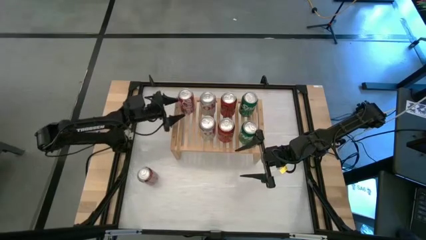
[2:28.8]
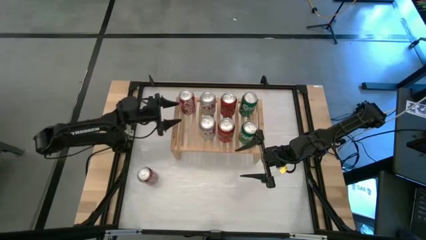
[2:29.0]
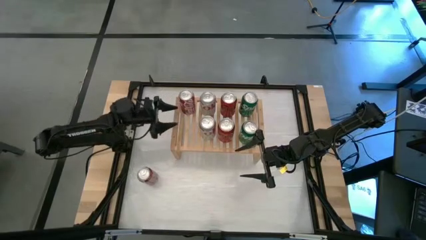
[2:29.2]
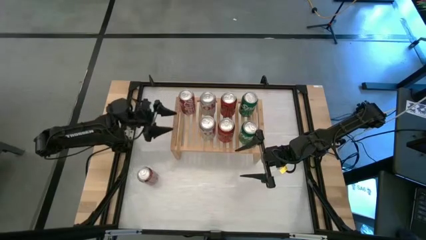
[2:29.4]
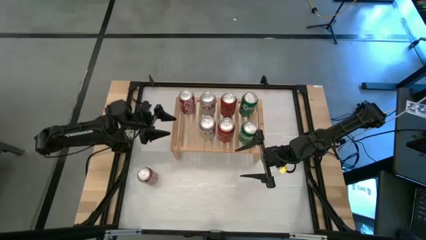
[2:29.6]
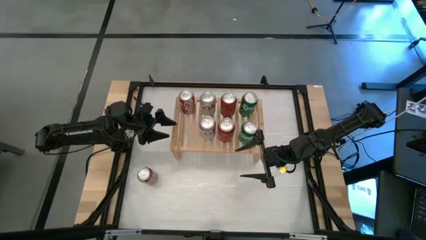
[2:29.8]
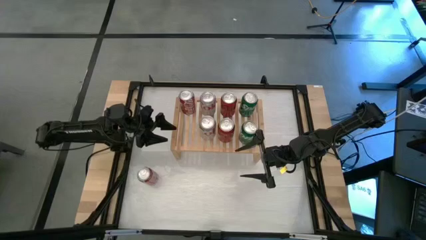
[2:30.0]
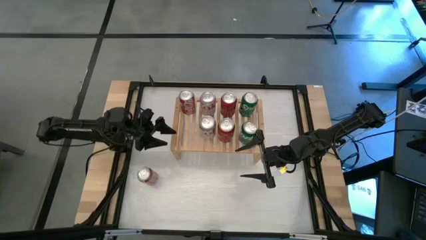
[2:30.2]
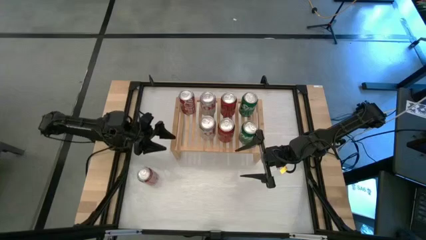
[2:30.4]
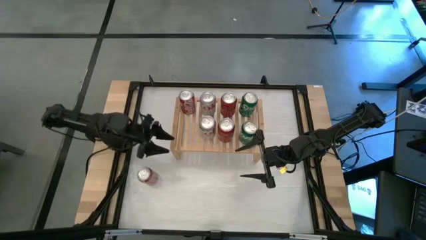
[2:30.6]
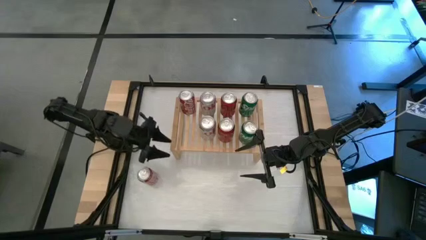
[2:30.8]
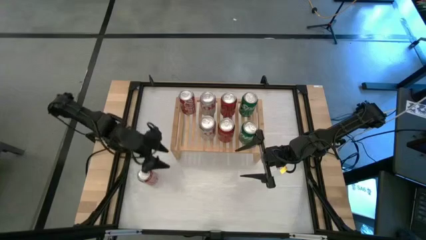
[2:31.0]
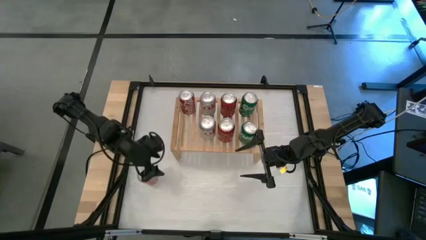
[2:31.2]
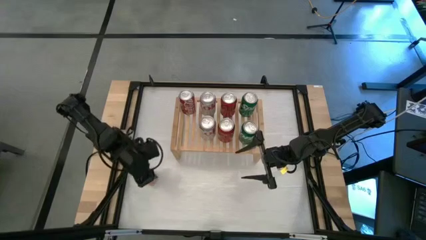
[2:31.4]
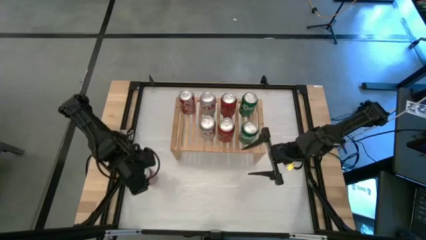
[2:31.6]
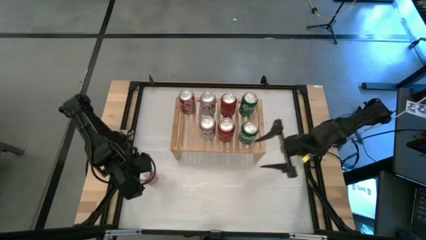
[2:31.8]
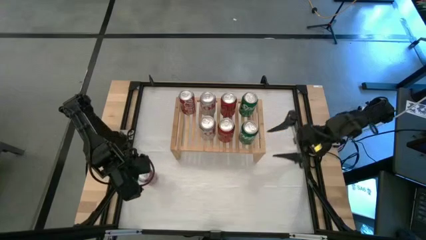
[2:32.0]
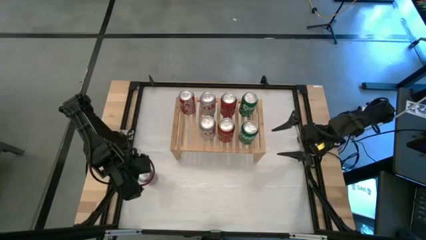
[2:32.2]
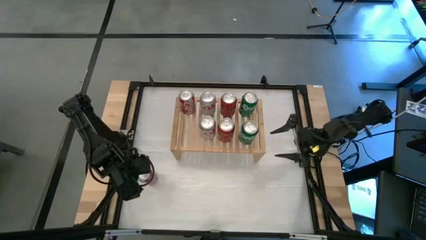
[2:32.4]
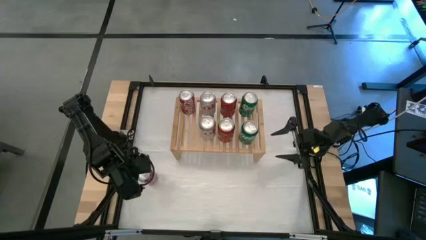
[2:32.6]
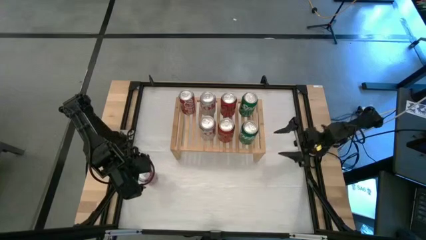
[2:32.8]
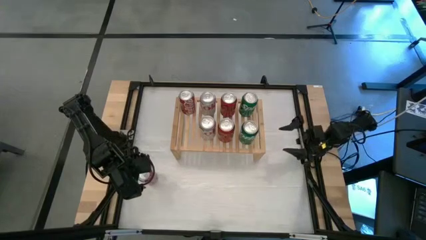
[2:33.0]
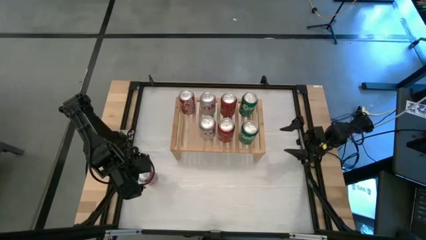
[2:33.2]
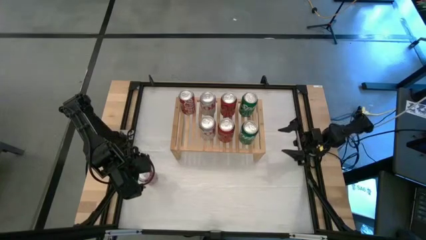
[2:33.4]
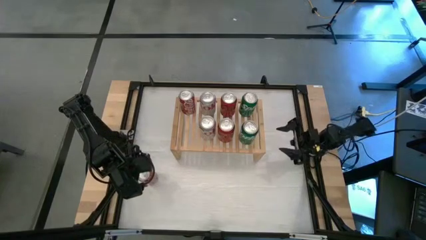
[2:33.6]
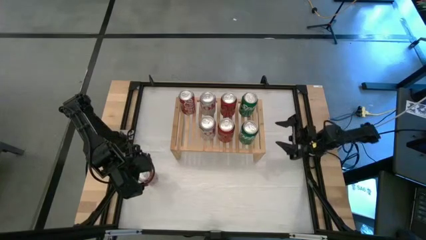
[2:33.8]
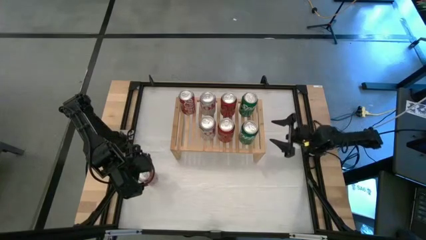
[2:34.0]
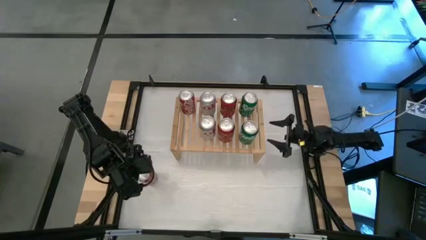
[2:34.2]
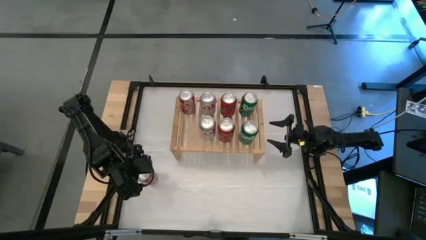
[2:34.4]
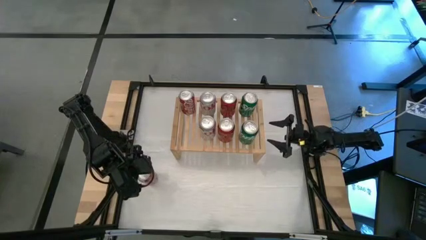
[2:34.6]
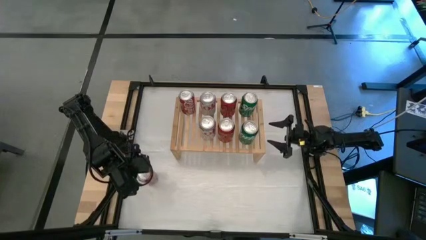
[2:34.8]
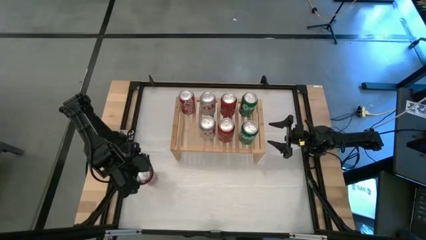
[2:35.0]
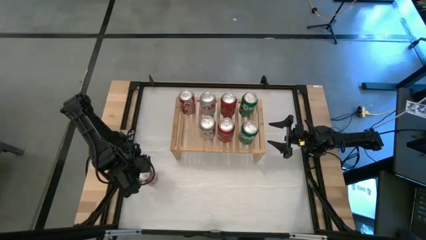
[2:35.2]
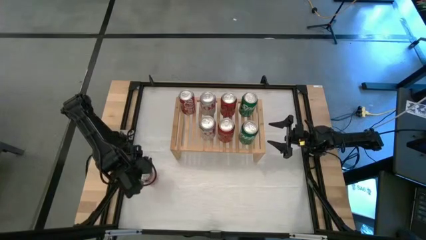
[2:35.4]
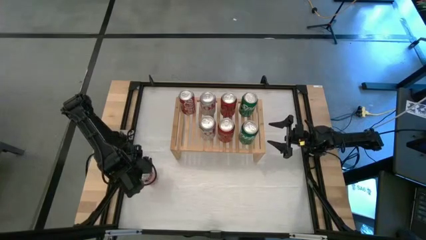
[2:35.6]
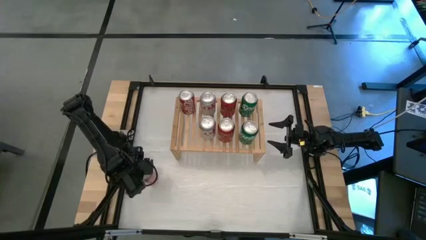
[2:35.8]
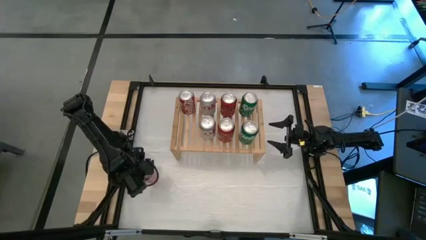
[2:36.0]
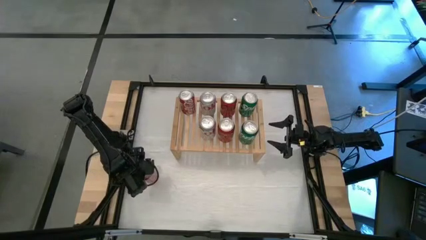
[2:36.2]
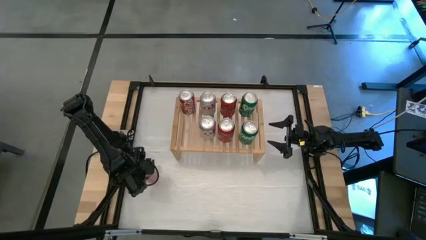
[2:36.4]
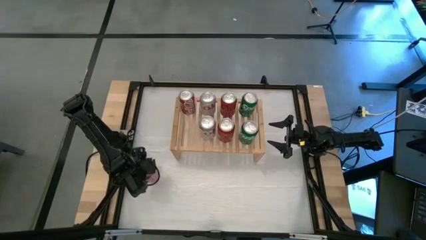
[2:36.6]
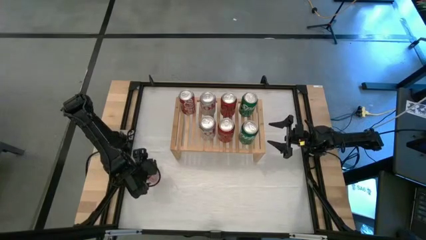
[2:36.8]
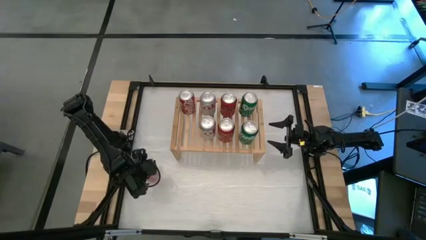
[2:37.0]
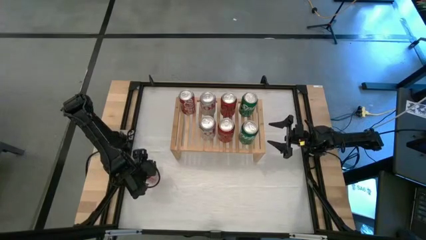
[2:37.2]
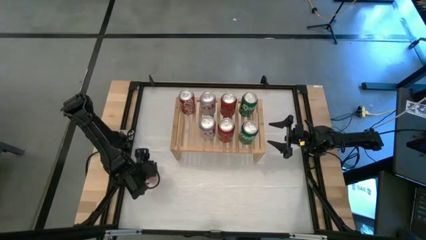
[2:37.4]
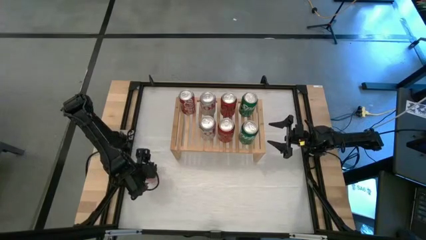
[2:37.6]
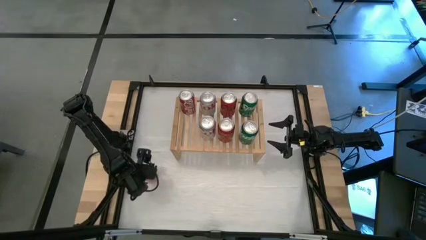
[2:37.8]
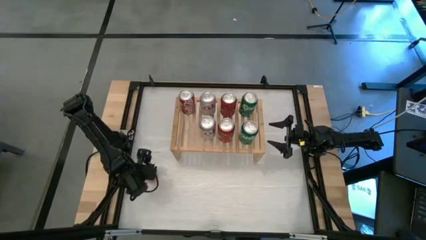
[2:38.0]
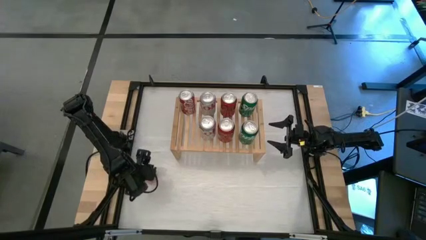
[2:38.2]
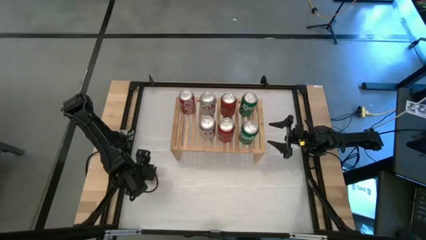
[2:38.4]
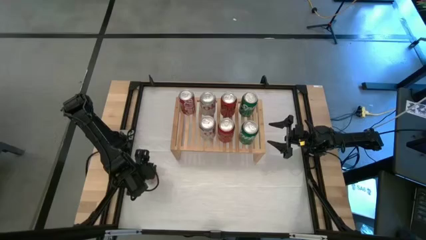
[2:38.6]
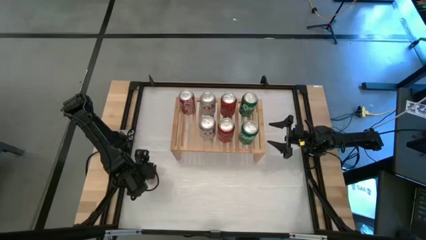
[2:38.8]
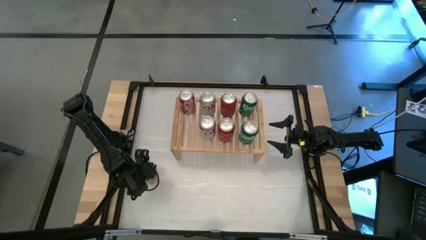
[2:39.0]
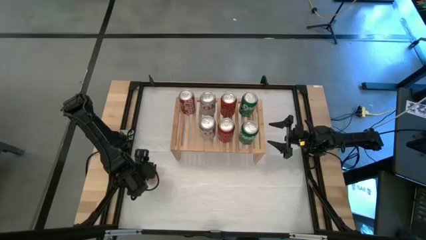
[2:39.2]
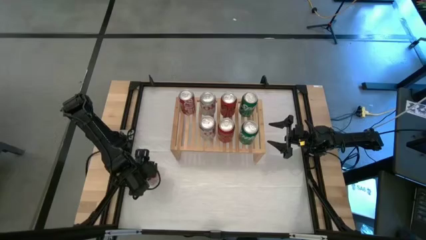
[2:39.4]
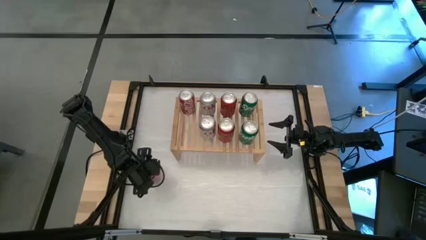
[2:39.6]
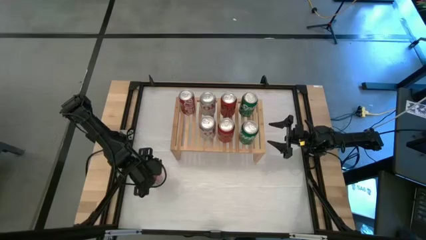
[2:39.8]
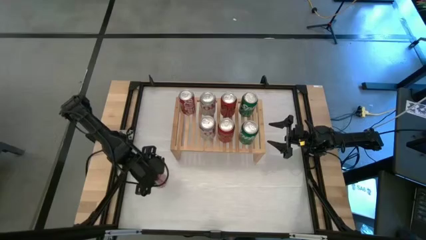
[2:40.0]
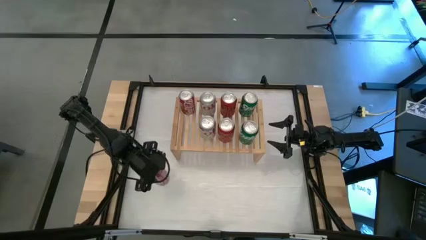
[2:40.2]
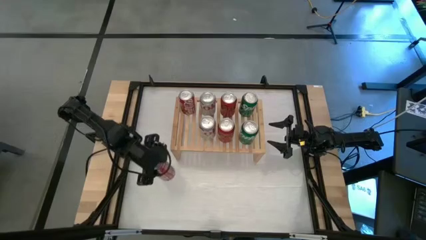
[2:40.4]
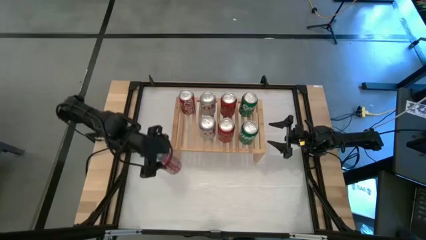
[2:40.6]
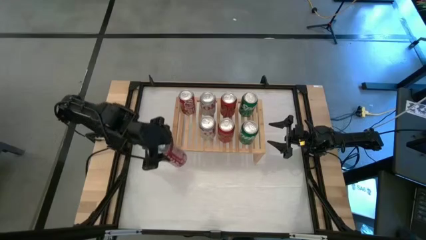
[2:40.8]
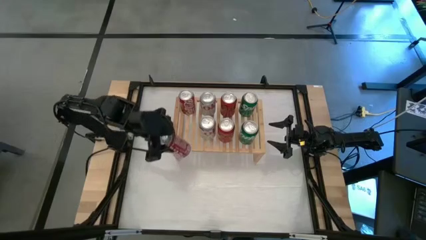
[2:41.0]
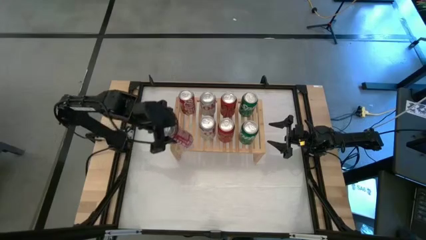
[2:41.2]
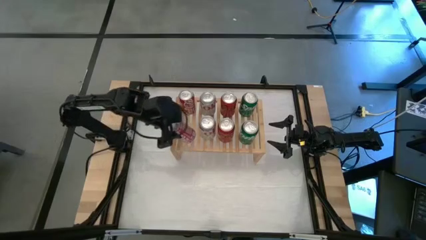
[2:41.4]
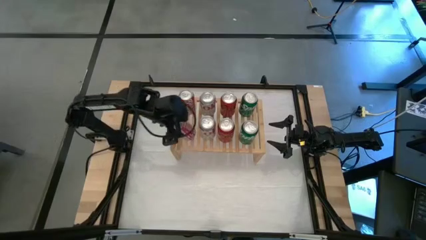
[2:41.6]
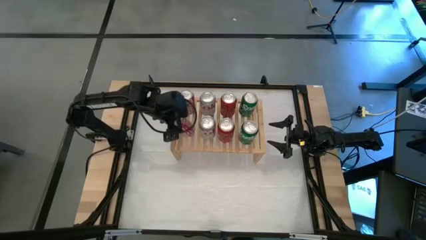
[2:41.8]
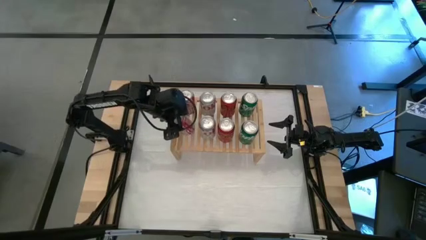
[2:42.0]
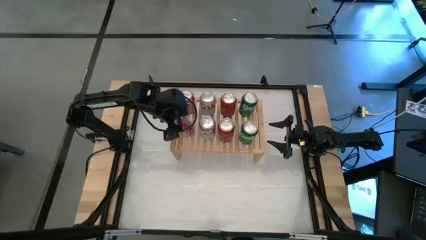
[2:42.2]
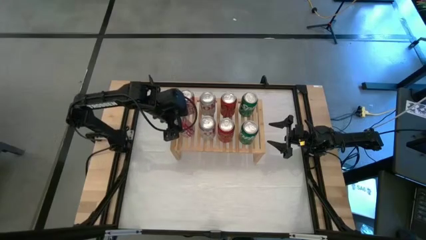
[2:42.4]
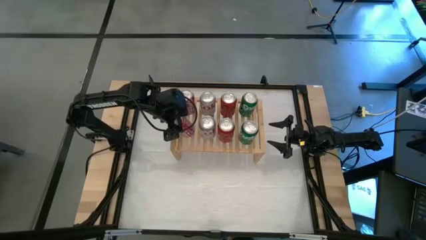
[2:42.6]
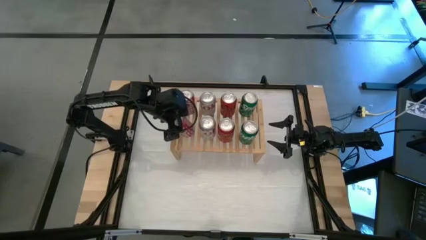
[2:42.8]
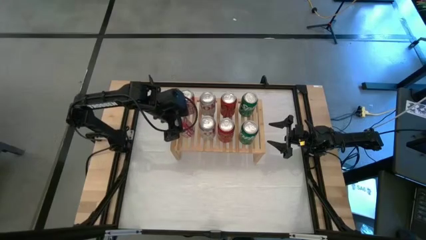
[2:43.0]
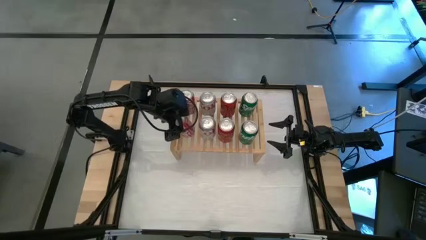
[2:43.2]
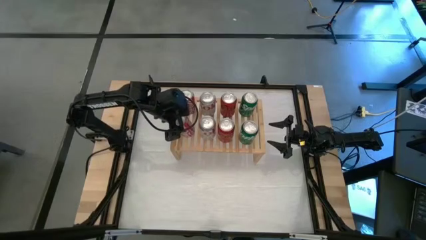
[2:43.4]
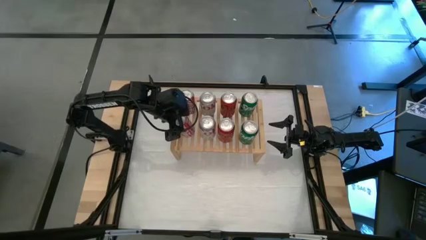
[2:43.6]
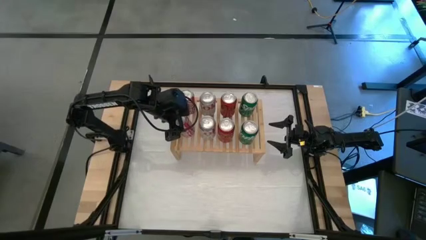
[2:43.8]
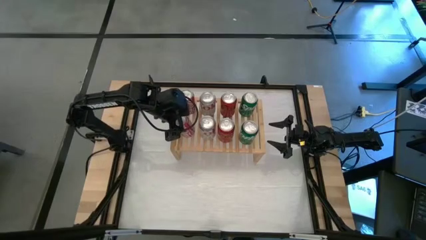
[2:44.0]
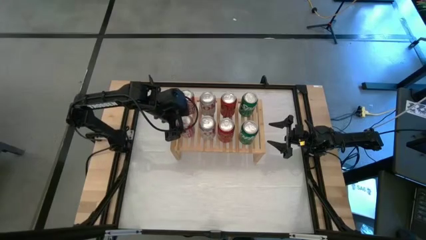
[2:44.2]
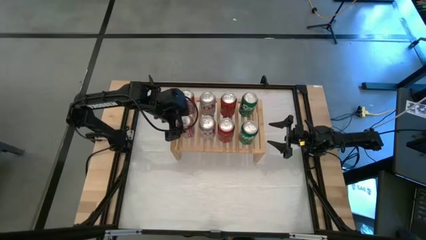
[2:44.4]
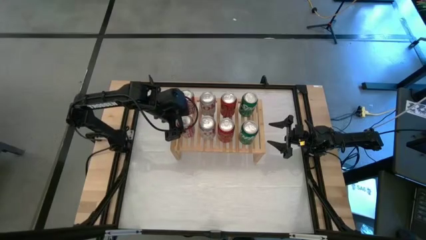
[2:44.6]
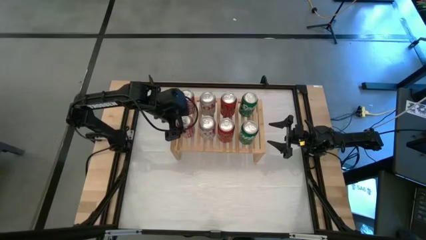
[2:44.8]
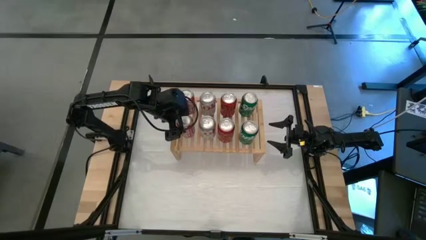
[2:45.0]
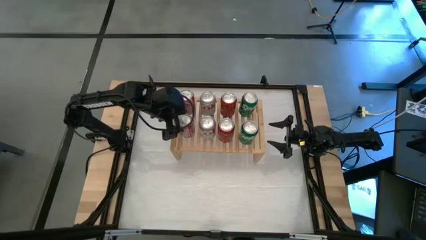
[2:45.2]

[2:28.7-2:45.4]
Task: Place canned beverage on shelf
Put the red white soda can on the shelf
